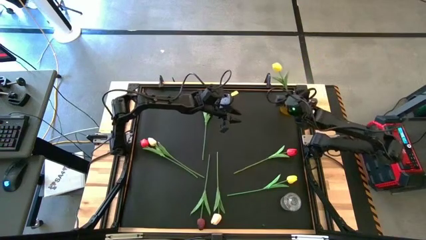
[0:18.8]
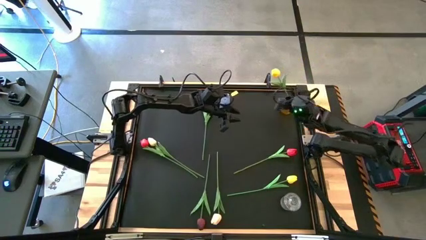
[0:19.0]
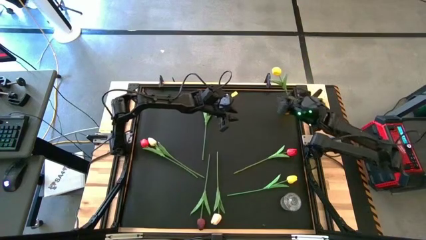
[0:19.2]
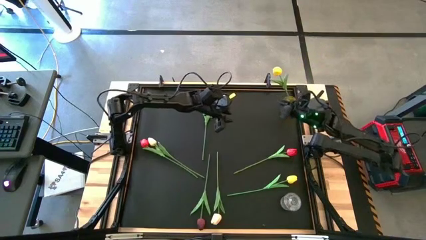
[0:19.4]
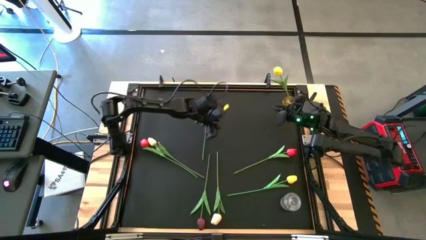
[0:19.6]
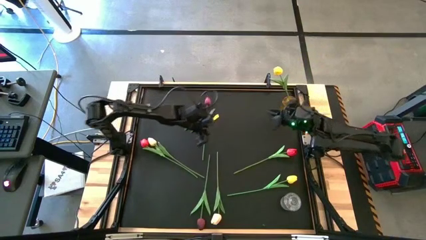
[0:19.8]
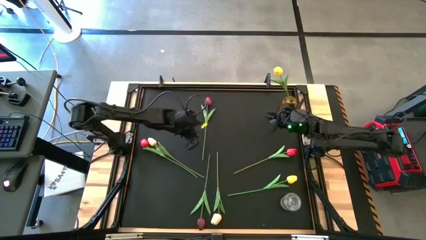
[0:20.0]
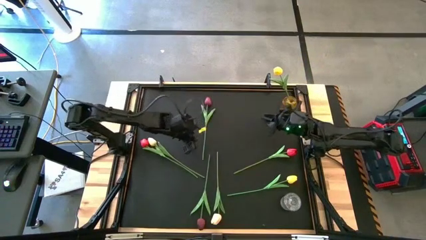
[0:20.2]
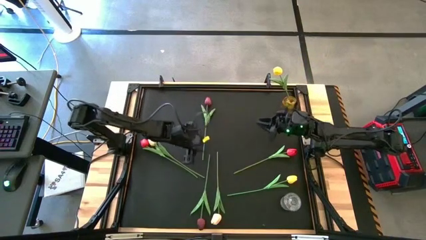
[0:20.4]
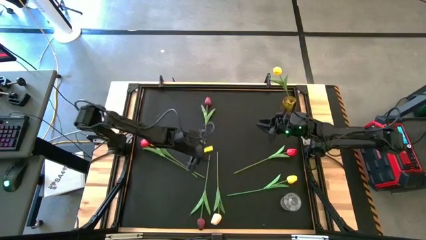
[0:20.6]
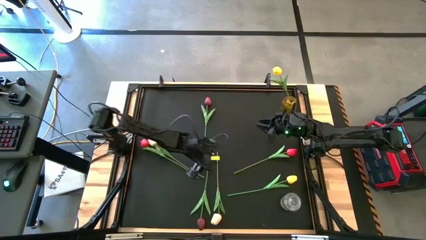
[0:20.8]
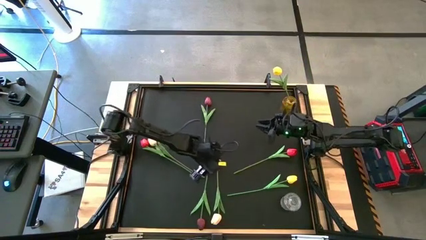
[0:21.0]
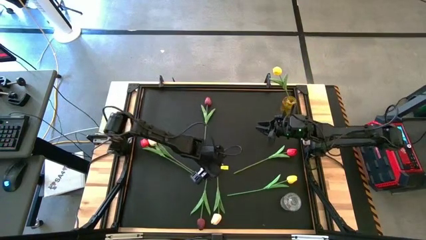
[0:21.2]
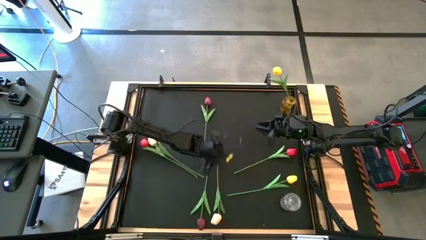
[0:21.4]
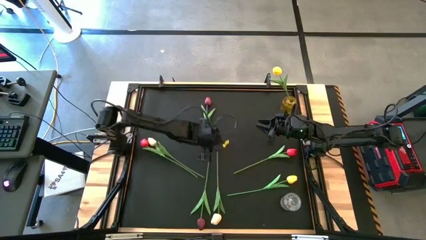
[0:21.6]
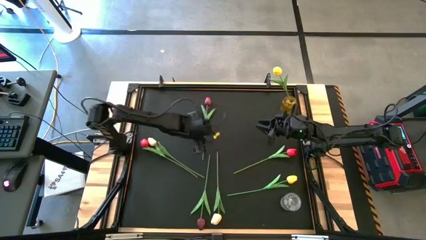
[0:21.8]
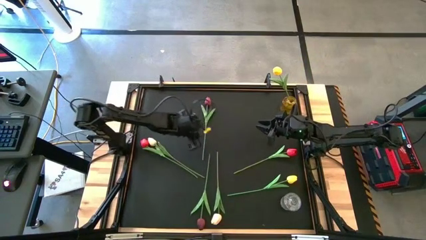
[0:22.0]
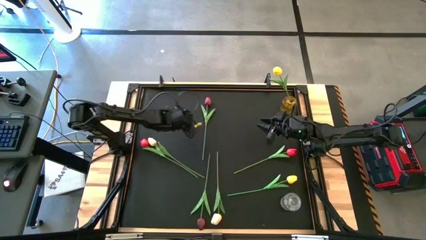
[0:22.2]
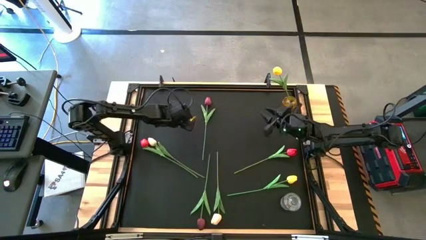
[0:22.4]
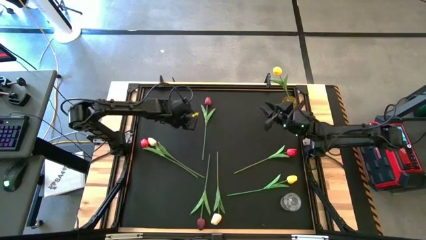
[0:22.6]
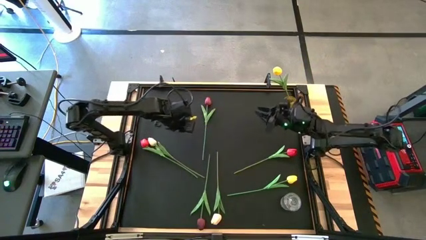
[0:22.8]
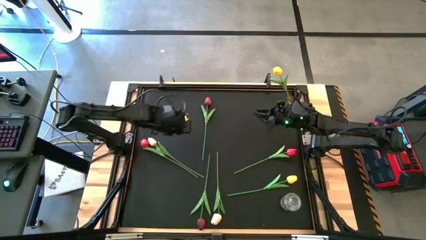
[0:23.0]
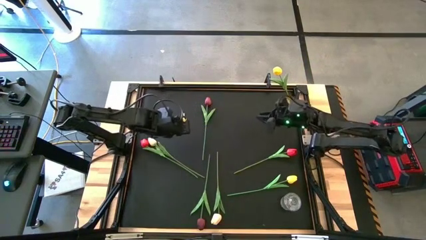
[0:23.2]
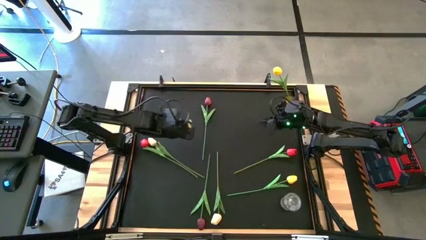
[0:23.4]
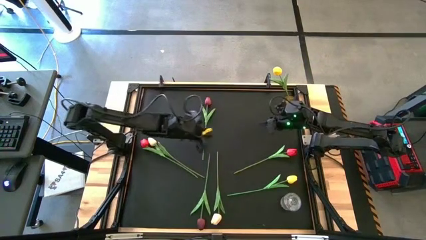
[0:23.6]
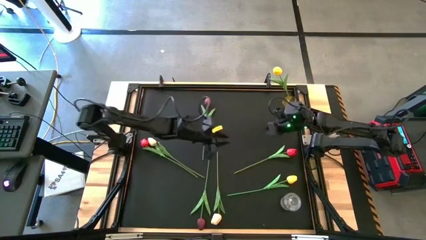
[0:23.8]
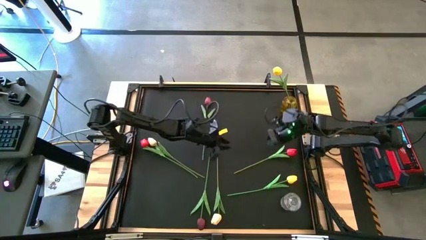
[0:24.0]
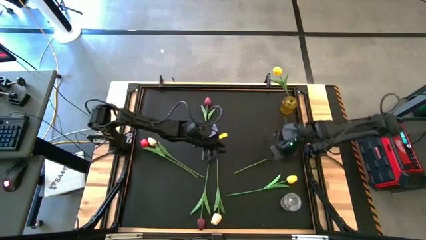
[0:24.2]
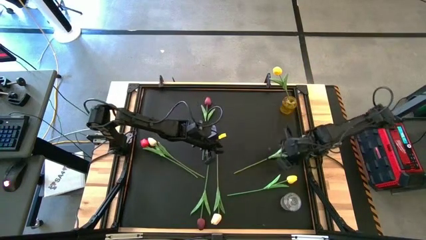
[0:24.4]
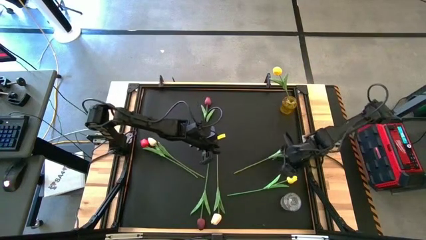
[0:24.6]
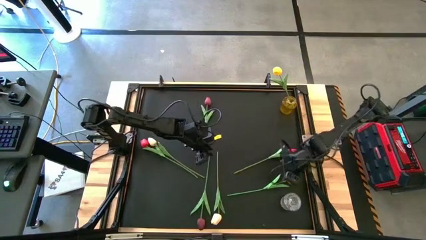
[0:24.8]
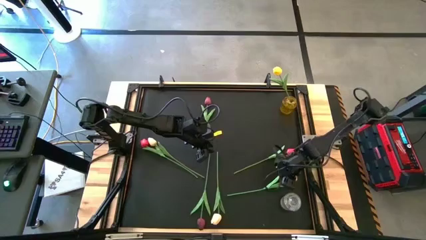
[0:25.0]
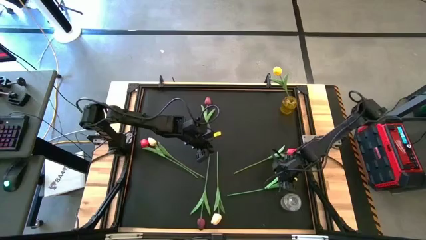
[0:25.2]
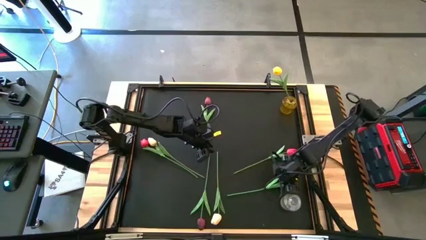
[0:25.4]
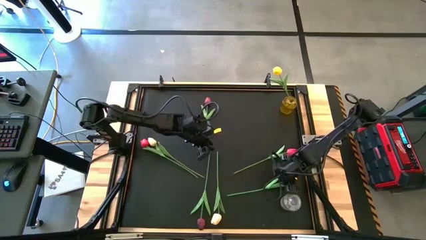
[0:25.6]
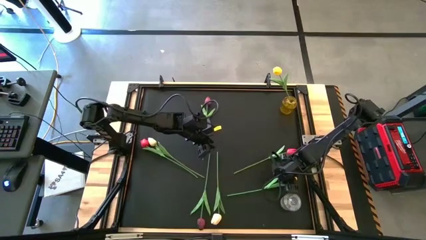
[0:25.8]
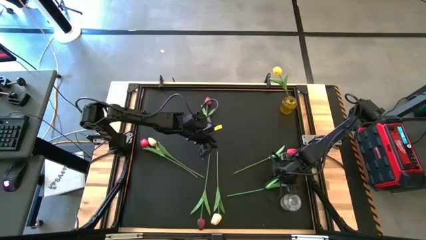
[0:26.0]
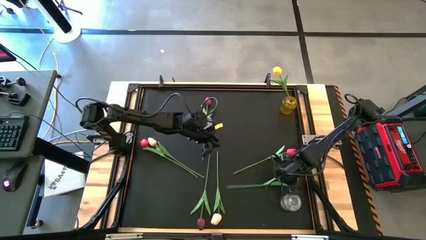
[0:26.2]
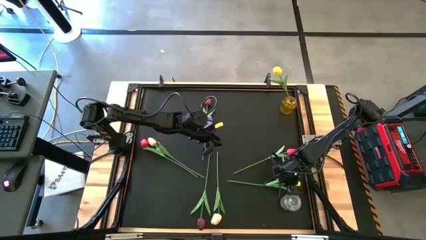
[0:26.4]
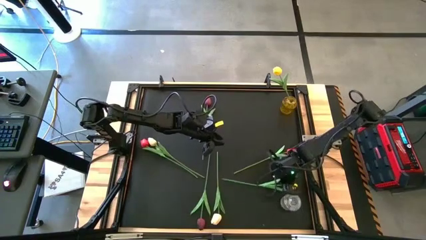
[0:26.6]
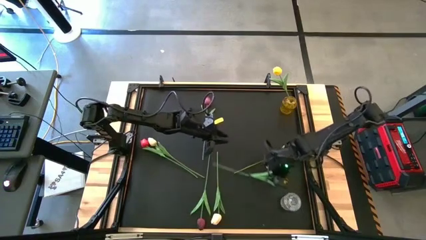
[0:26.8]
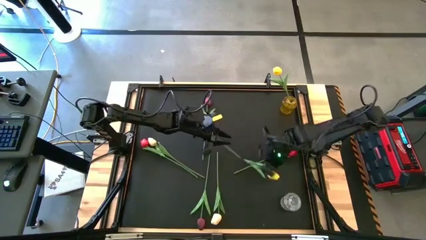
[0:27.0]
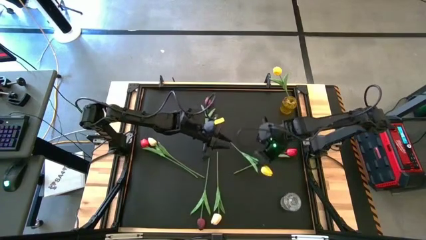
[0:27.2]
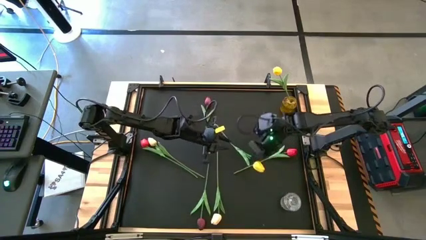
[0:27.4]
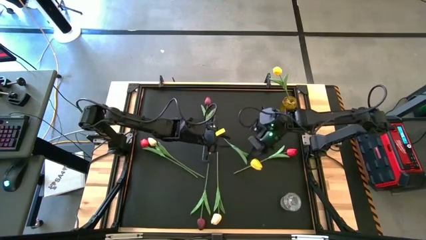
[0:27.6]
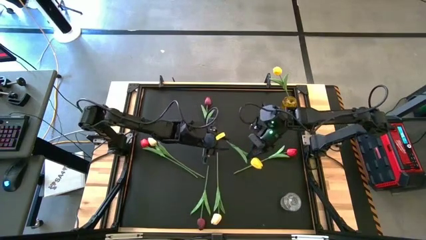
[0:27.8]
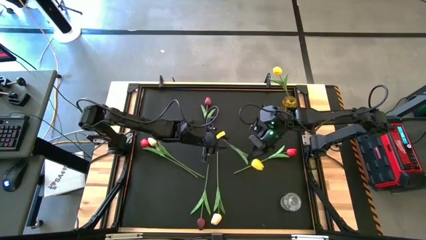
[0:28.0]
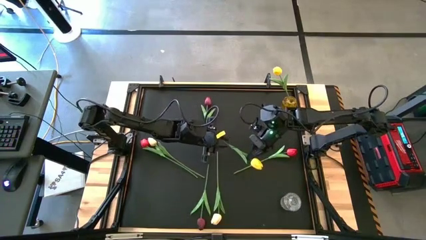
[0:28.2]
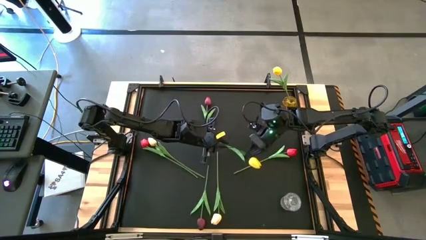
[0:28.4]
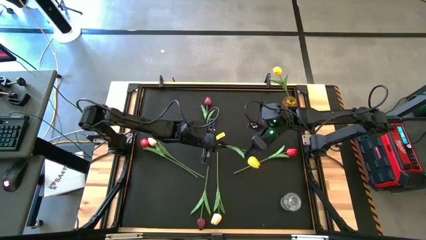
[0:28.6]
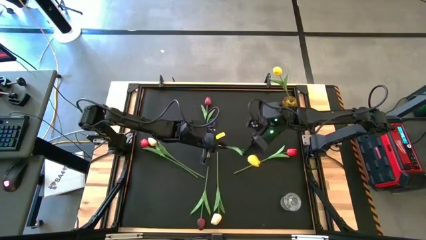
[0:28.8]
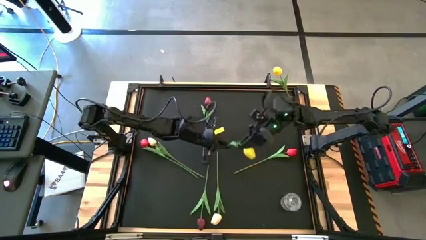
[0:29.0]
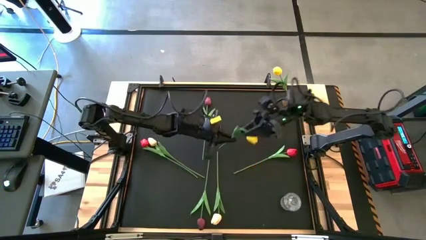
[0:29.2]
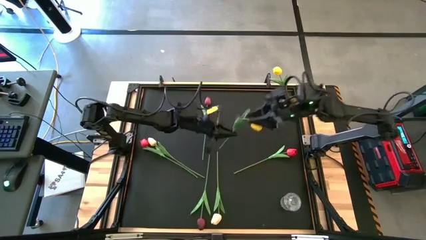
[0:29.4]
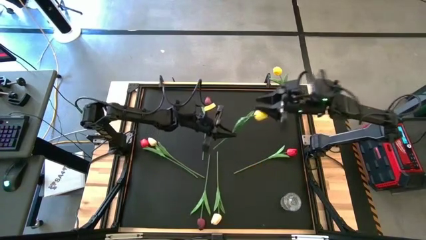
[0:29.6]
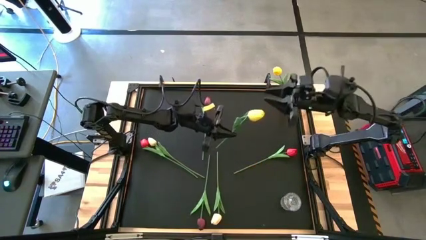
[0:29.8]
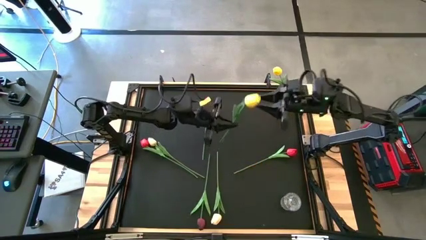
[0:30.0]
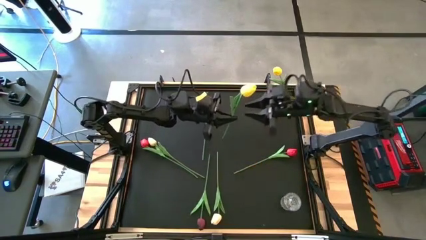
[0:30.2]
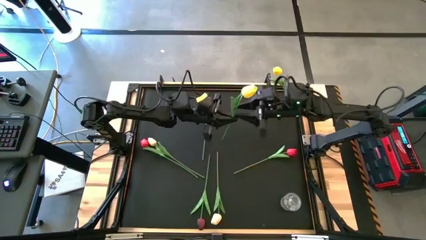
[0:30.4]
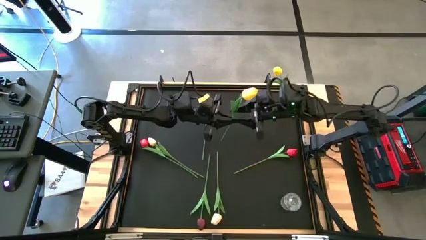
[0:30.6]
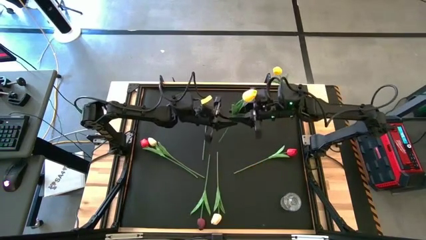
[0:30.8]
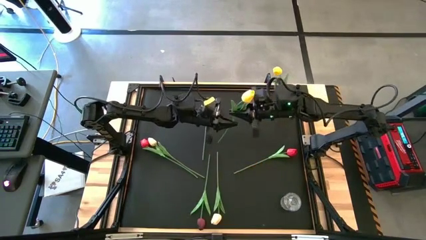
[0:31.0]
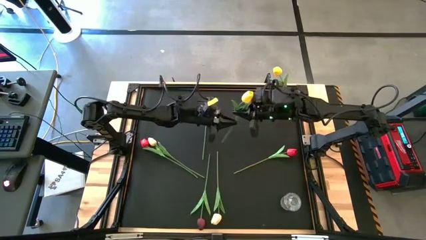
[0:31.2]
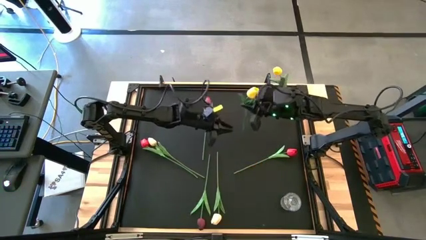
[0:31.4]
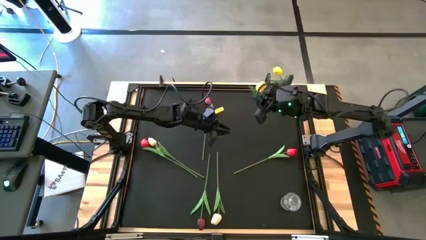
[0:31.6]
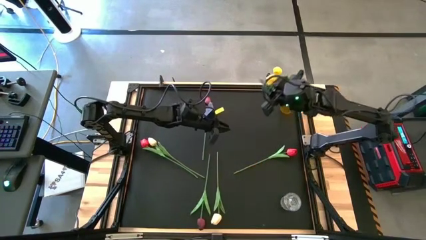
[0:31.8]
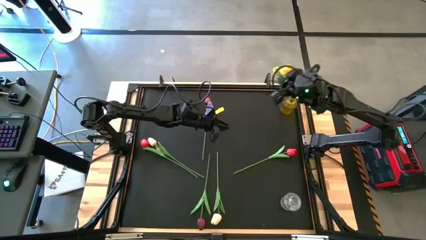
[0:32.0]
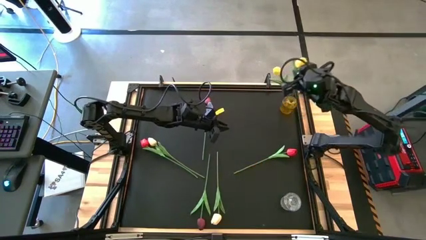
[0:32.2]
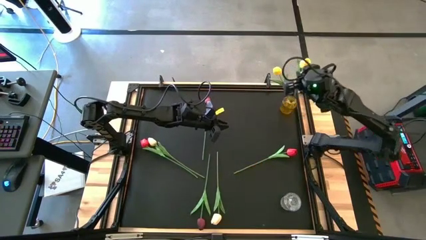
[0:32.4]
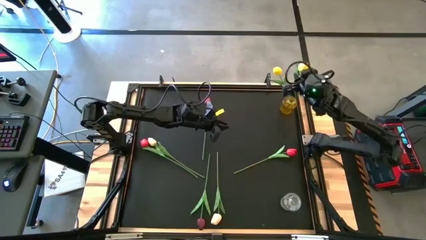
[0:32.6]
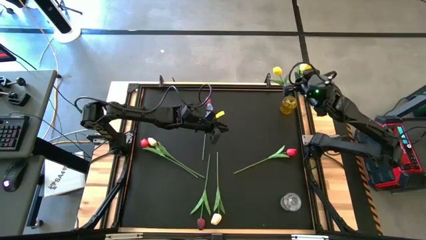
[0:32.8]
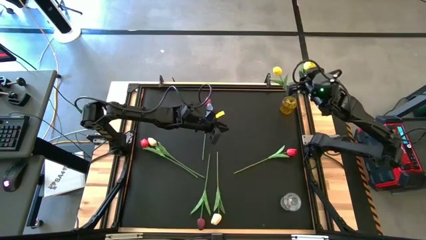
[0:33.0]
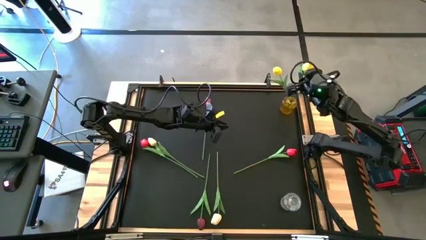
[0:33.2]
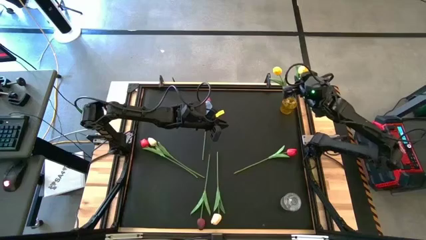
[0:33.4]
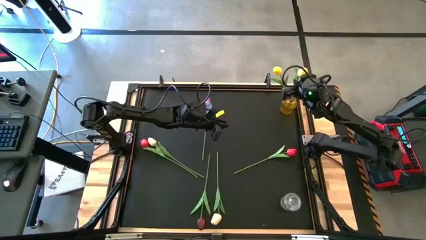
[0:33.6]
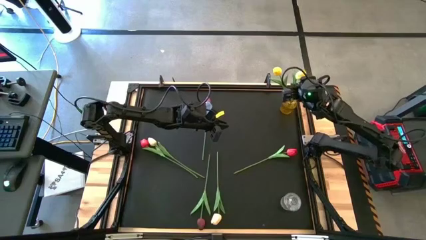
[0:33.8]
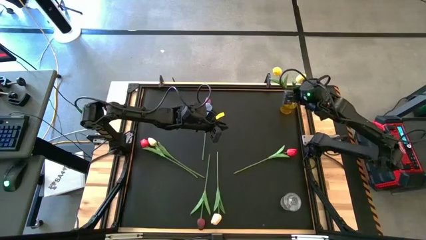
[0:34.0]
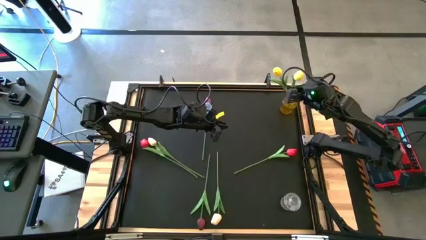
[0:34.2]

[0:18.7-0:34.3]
Task: Sort flowers into vase by color
Put the yellow flower into the yellow vase

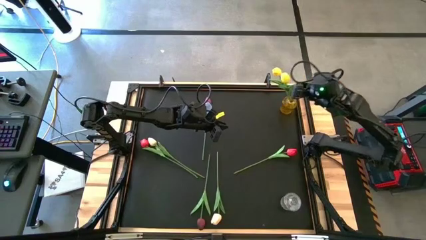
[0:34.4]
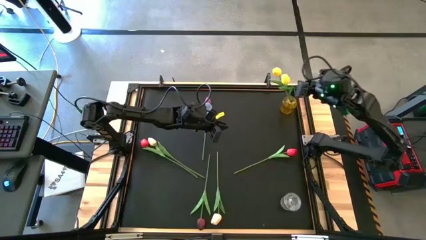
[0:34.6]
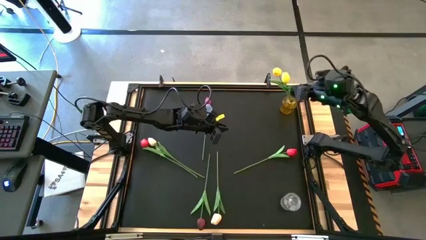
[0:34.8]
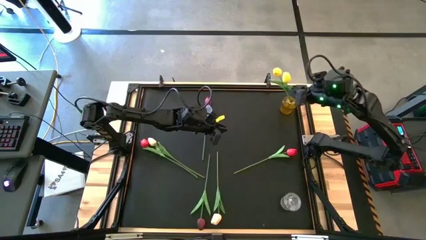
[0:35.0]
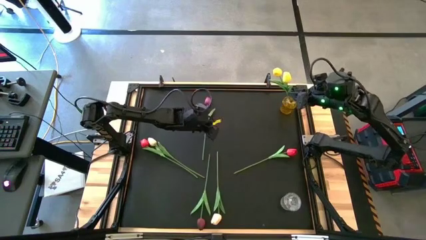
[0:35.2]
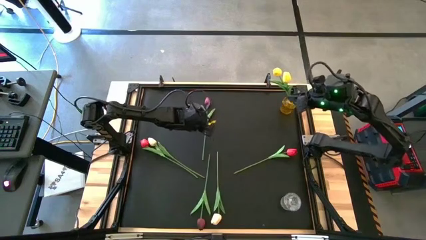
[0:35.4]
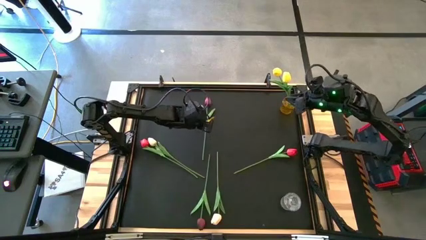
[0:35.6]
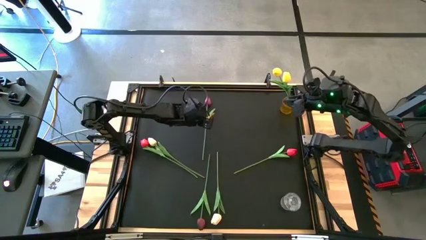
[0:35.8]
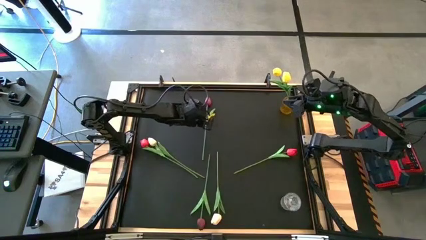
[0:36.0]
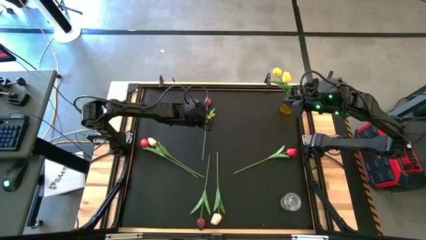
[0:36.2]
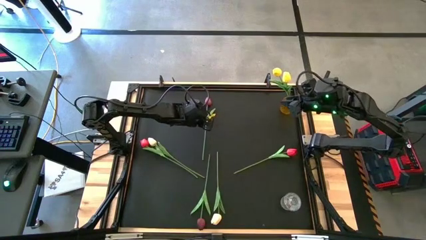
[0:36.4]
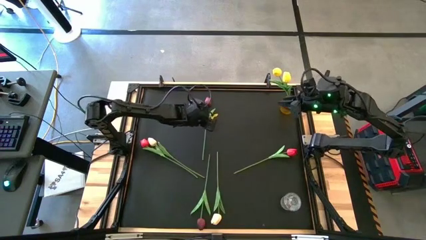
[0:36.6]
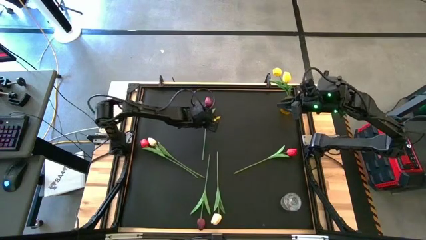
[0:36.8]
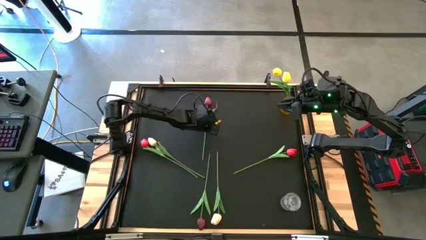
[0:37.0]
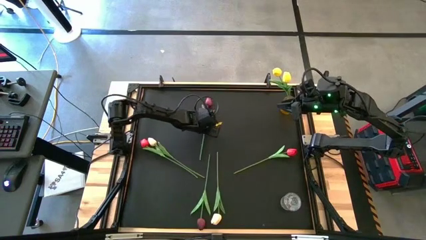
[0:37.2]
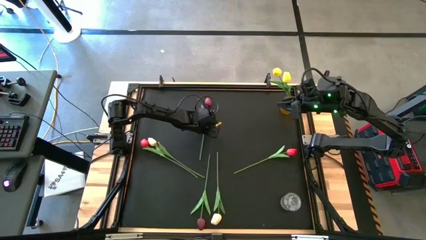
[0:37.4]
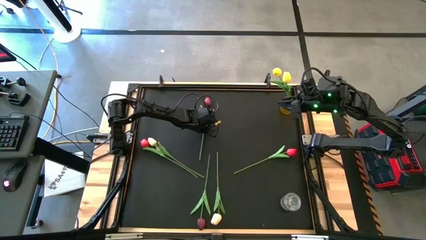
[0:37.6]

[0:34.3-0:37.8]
Put the top dark red flower into the yellow vase
